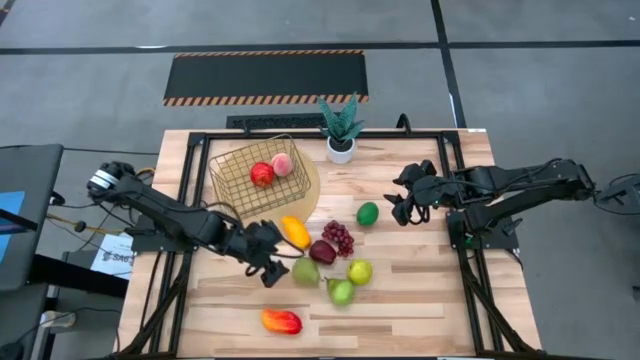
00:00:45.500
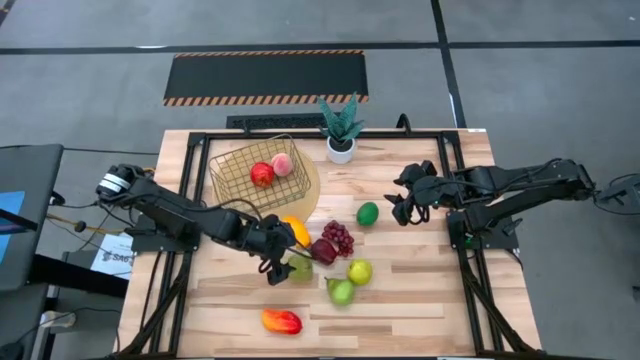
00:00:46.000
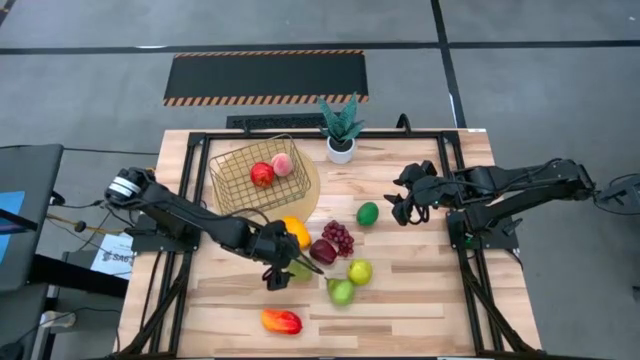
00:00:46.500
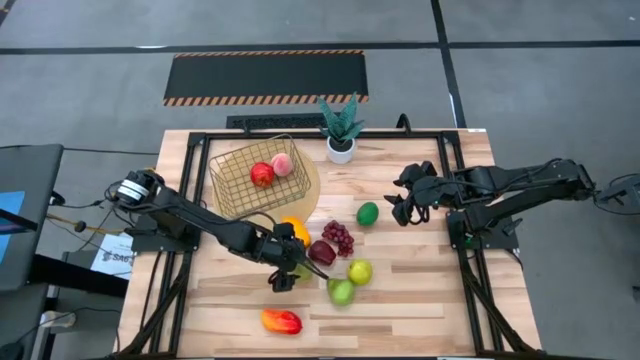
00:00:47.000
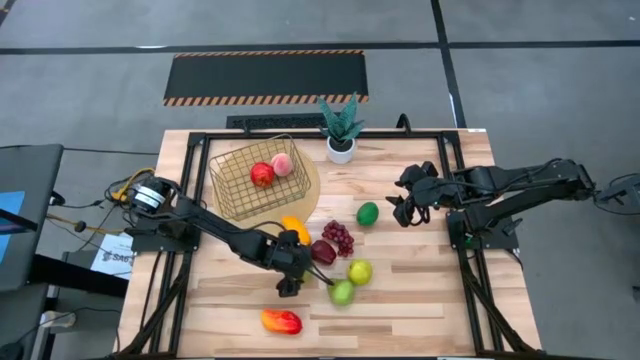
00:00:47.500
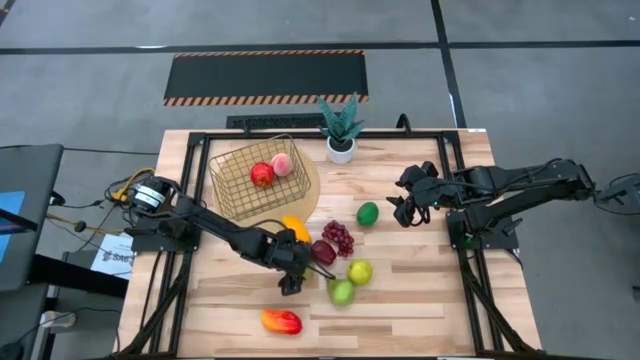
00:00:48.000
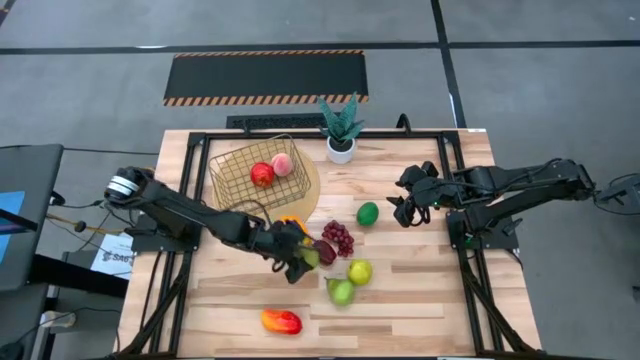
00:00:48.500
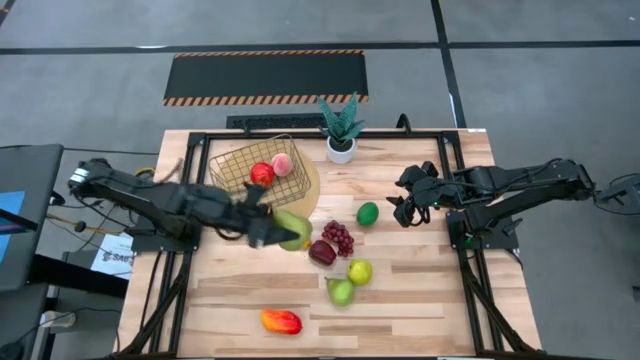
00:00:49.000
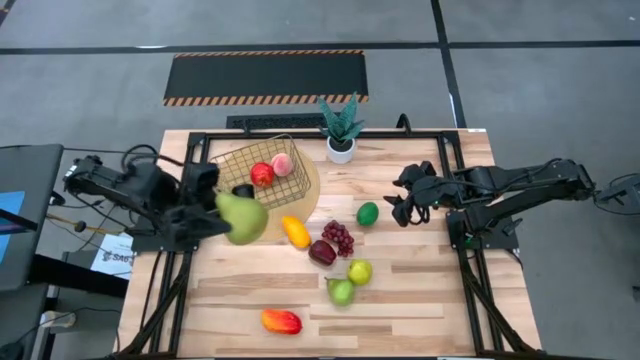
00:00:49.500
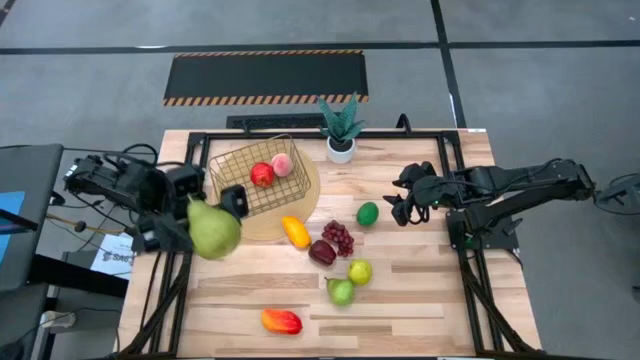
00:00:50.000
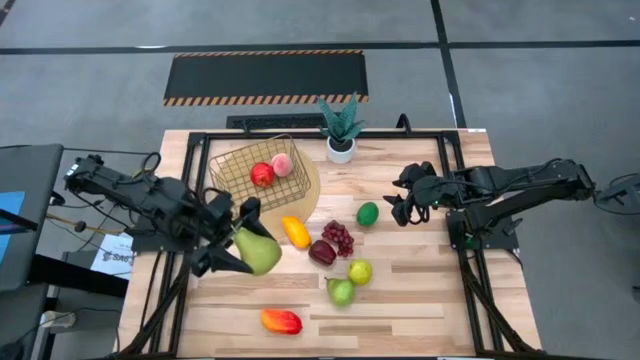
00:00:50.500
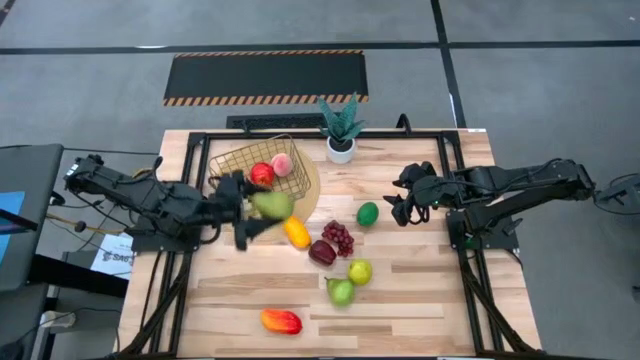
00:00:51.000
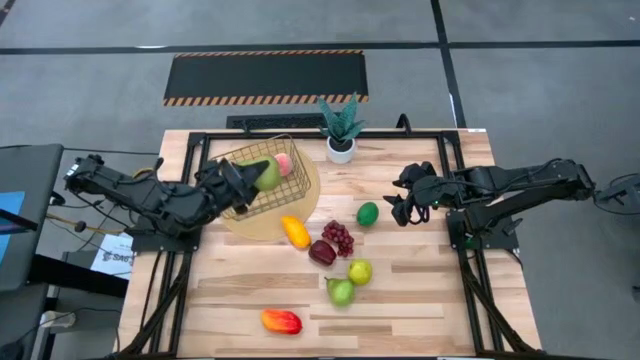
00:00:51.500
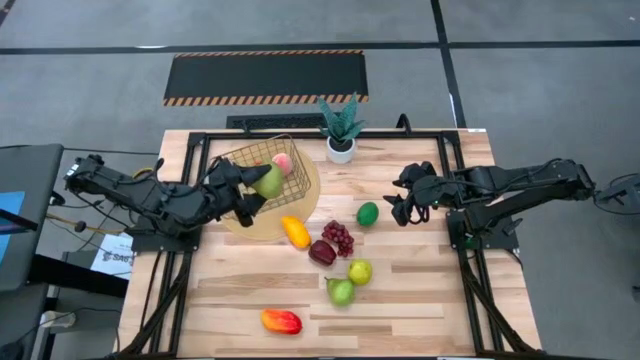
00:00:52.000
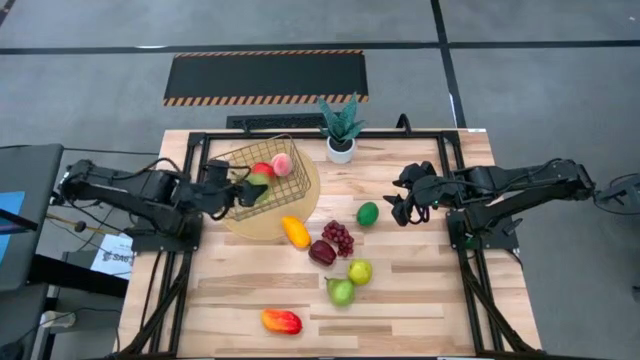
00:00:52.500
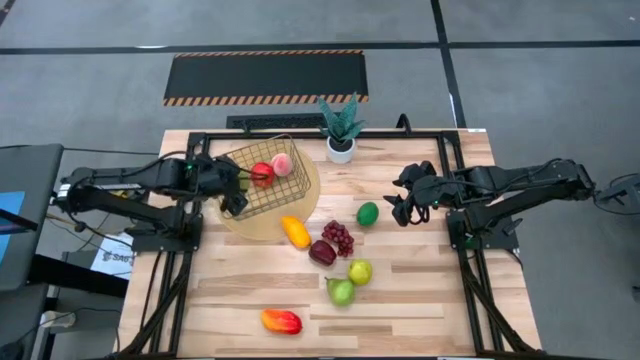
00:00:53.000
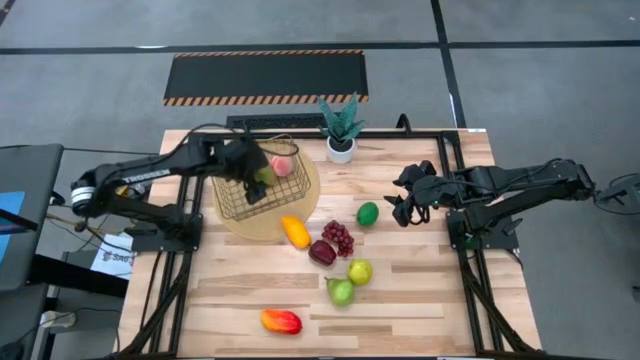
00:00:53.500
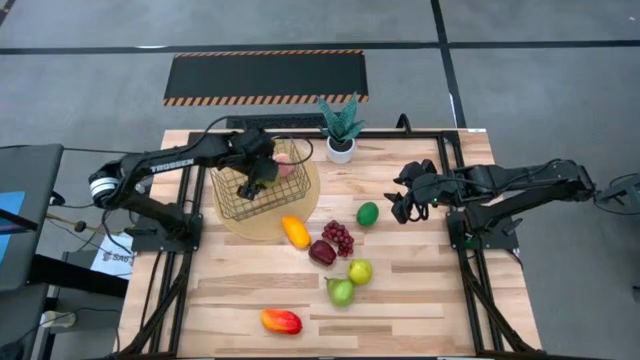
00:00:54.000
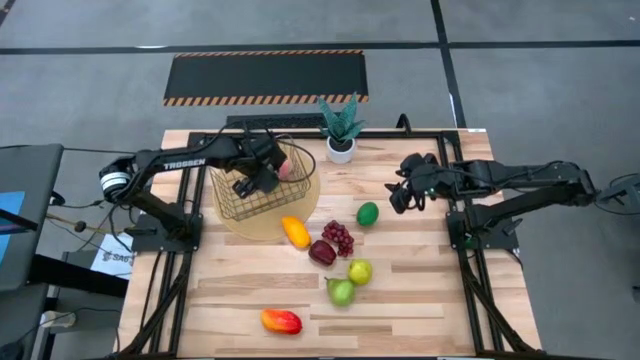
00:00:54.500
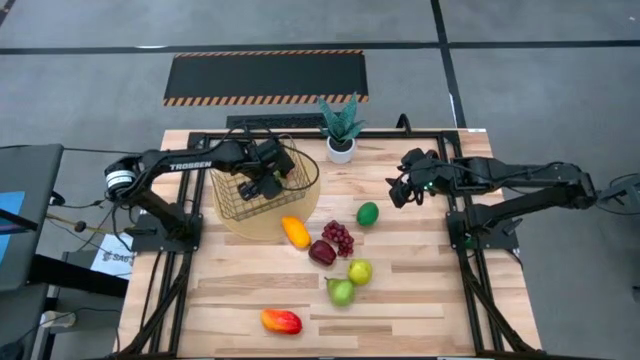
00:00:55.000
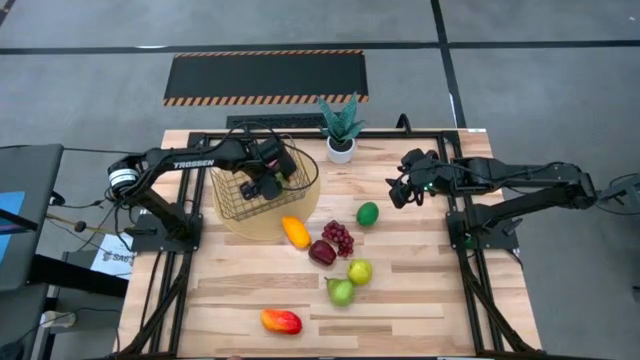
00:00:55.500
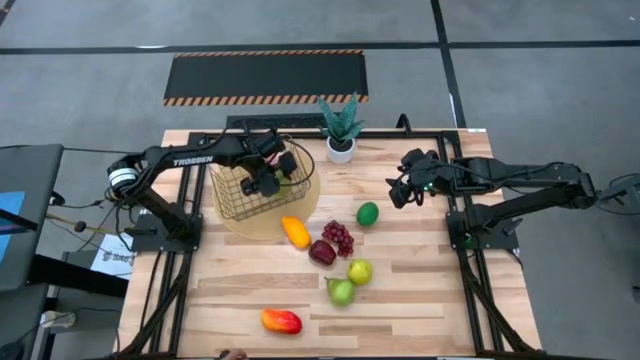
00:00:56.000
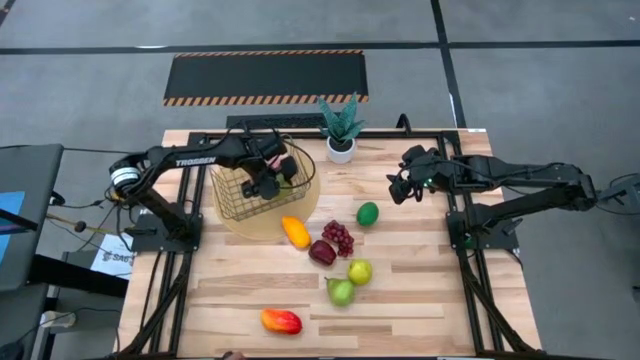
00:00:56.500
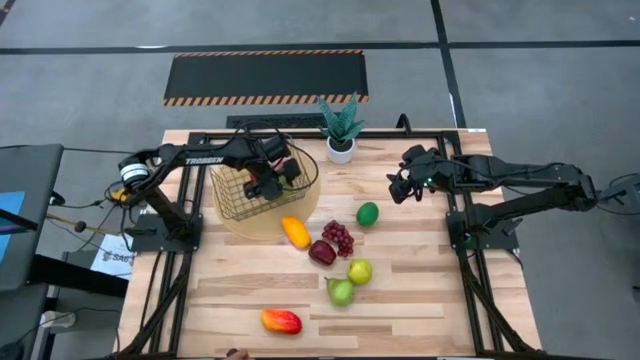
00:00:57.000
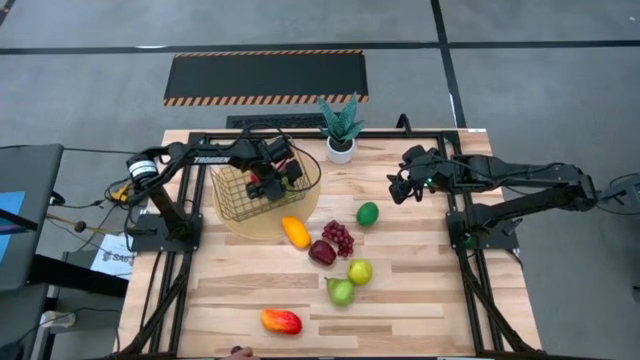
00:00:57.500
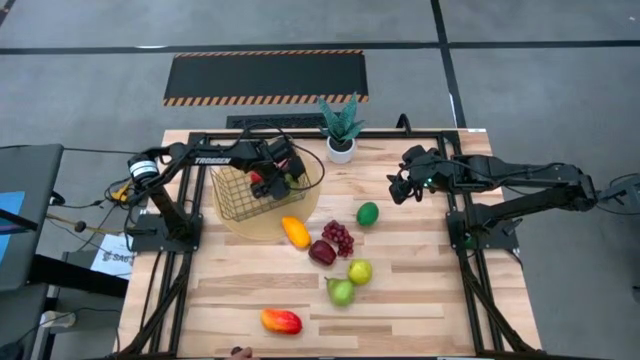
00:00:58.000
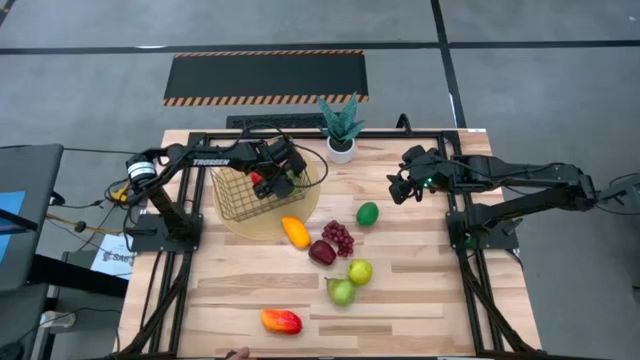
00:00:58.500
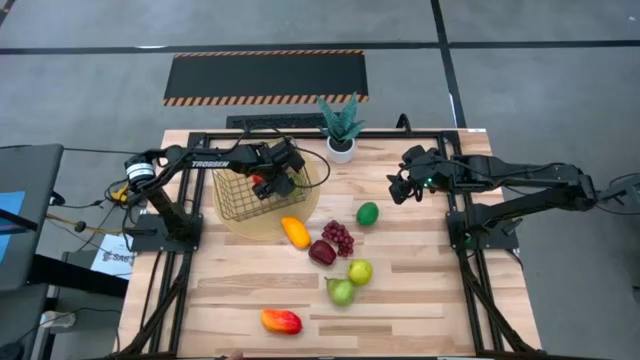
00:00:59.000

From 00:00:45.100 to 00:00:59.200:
Task: Build produce basket
Put the left pear in the wired basket
